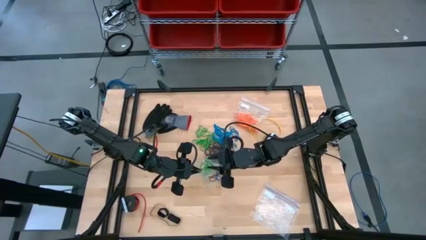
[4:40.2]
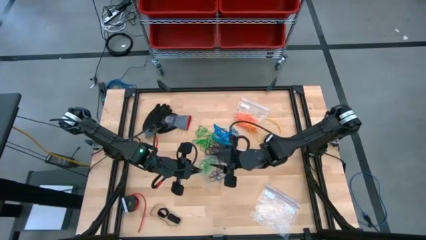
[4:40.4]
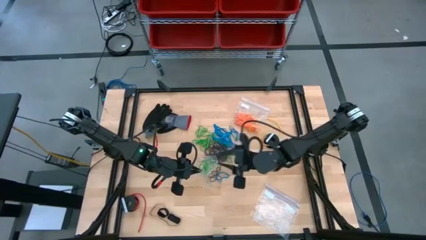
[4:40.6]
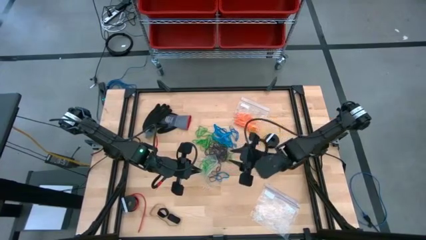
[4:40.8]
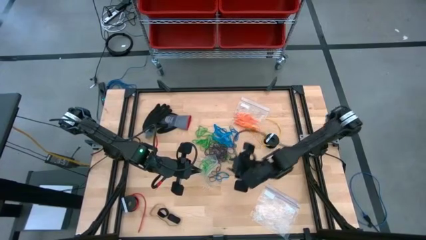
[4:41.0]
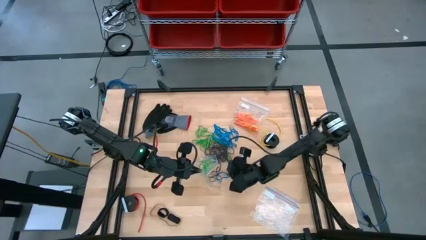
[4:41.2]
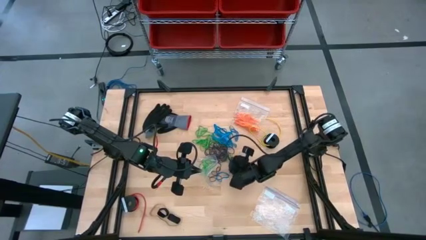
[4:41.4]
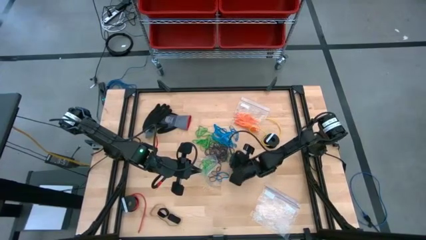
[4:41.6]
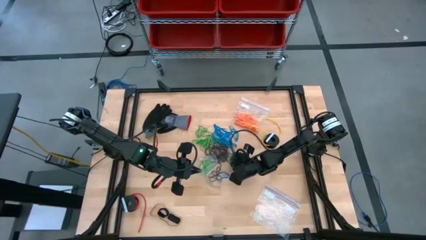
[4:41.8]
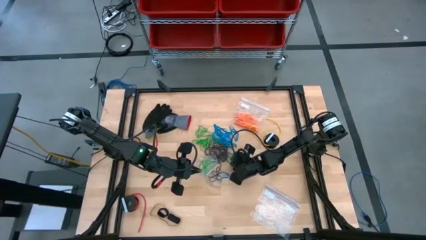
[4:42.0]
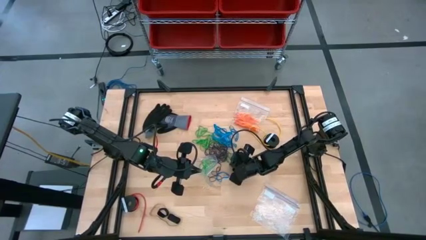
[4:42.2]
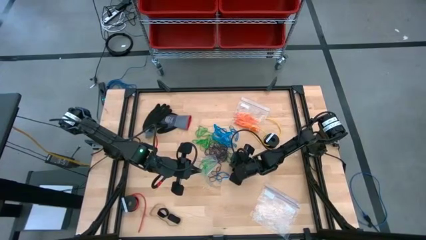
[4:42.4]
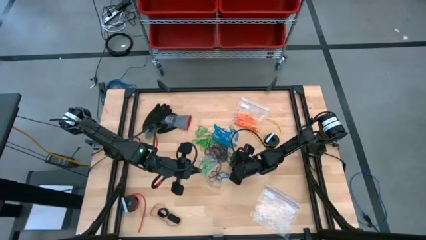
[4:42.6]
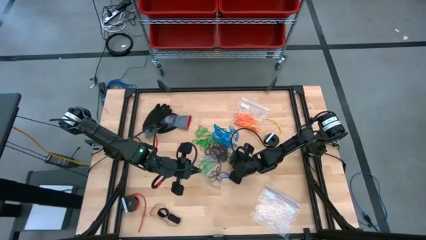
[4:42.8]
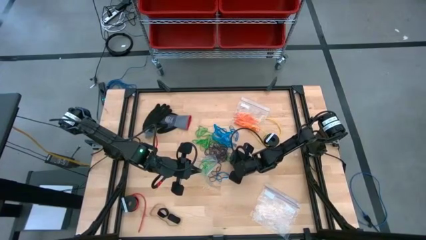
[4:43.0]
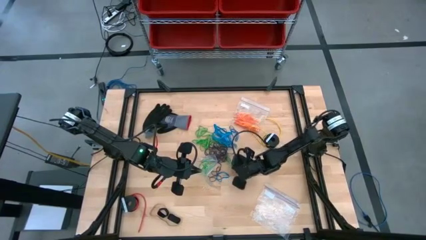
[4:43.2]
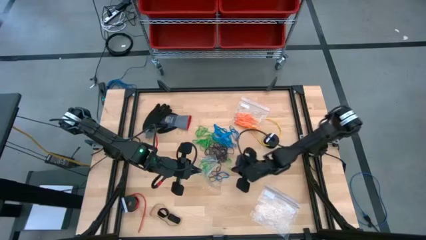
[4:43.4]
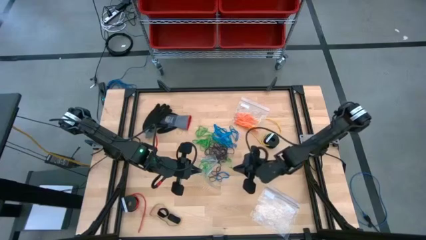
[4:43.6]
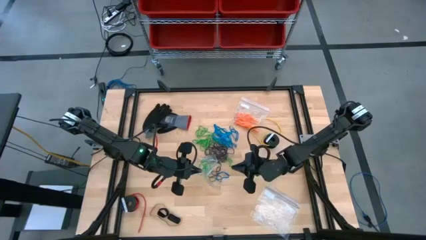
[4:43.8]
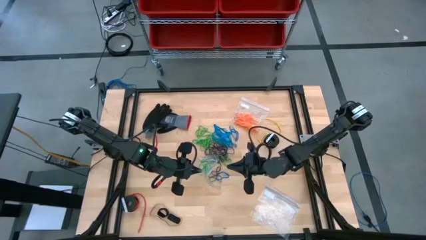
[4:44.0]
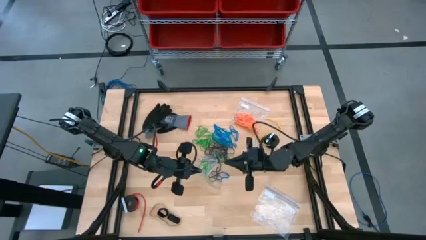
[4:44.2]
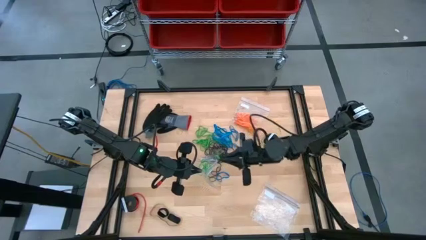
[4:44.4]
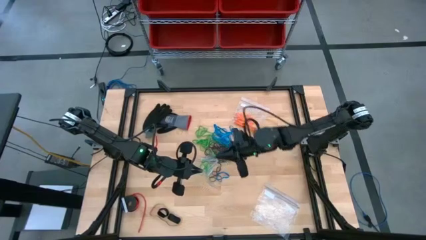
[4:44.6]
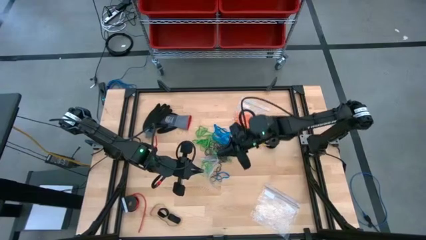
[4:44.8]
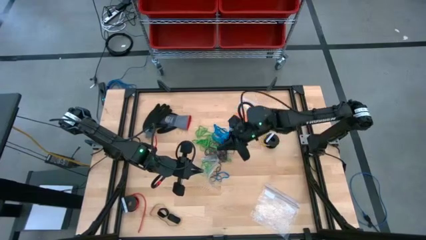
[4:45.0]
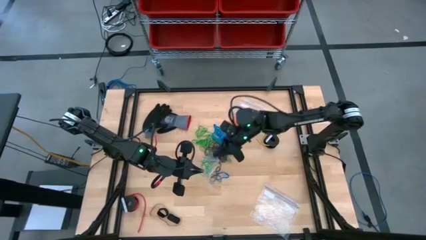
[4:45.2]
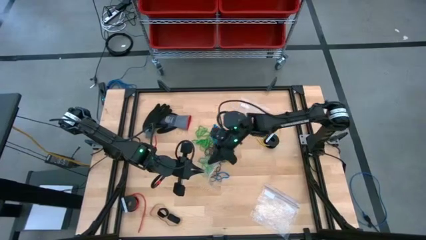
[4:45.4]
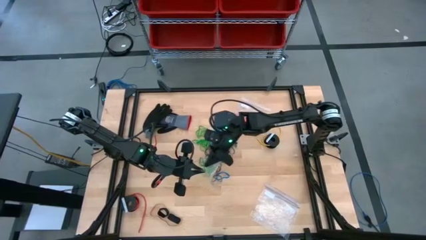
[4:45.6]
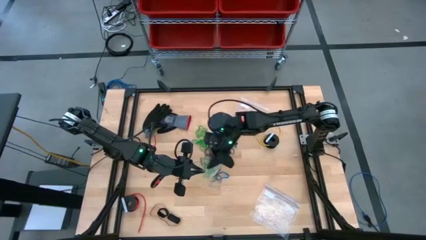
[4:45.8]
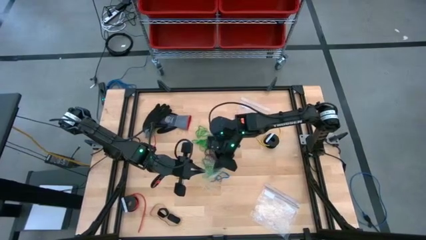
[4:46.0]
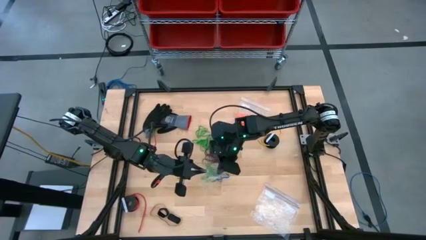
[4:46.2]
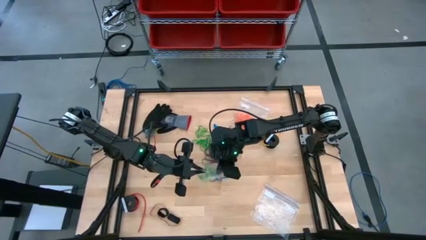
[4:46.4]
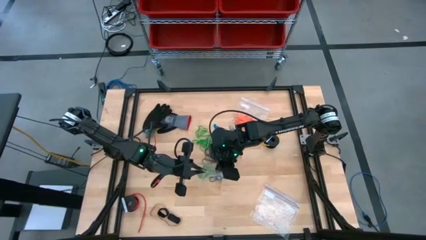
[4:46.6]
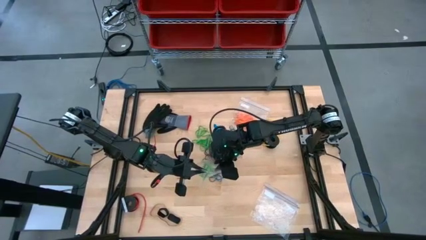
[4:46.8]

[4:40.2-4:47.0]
Task: Sort rubber bands
Put the green rubber band into the transparent zip bag

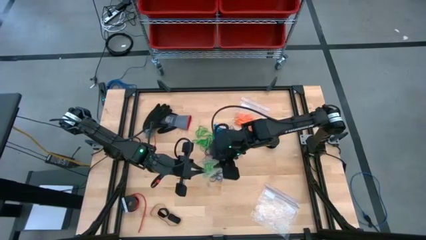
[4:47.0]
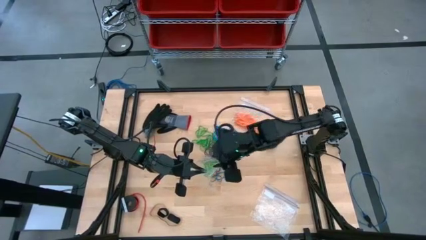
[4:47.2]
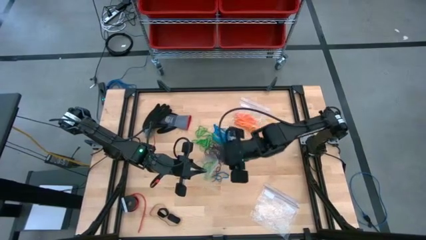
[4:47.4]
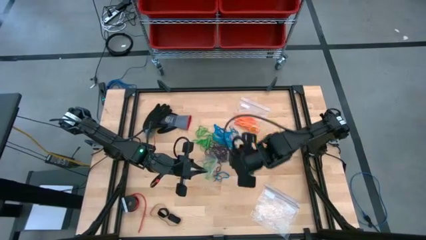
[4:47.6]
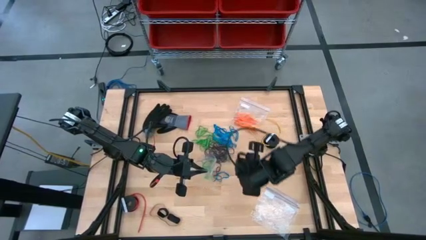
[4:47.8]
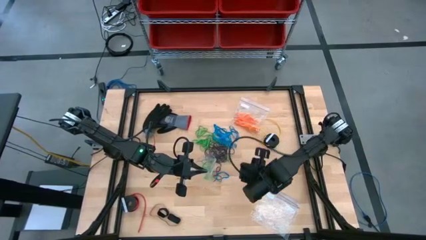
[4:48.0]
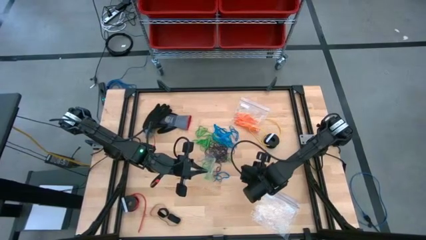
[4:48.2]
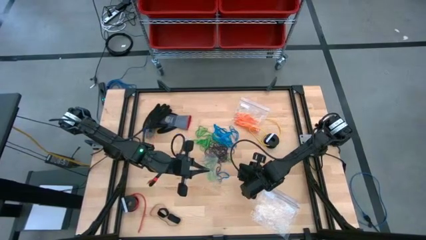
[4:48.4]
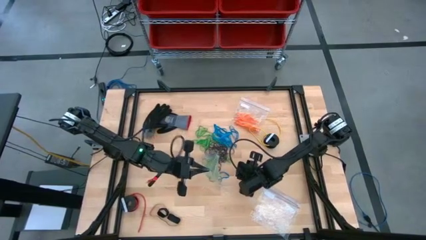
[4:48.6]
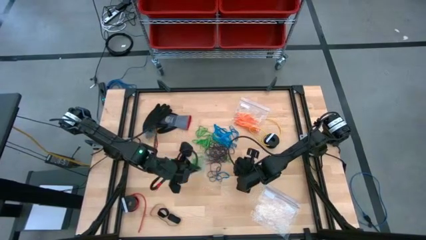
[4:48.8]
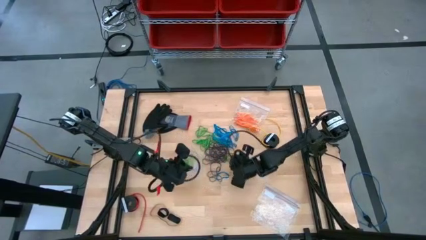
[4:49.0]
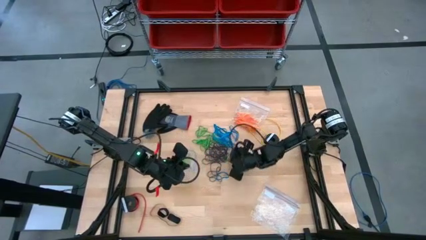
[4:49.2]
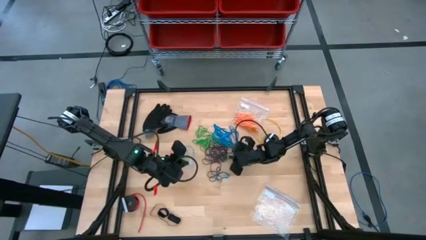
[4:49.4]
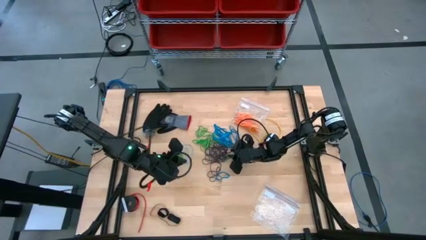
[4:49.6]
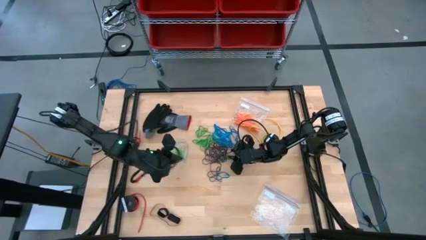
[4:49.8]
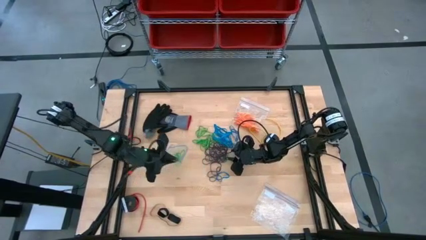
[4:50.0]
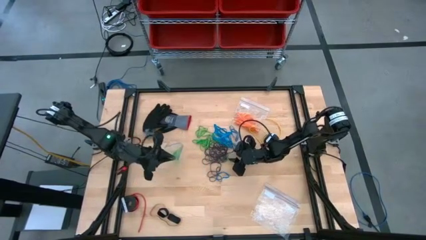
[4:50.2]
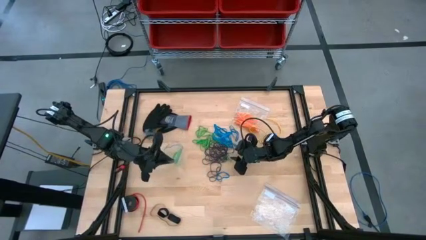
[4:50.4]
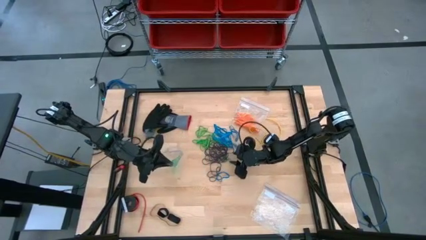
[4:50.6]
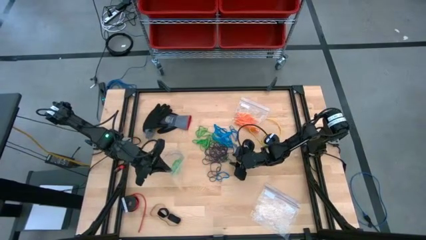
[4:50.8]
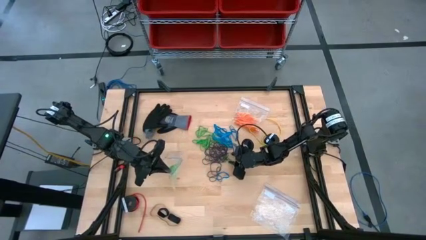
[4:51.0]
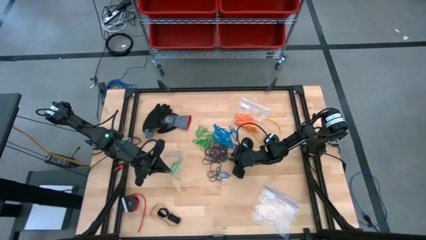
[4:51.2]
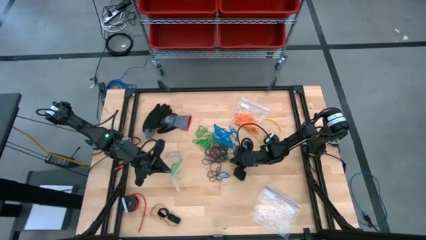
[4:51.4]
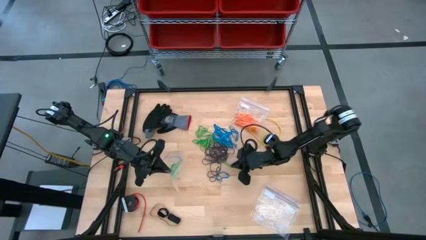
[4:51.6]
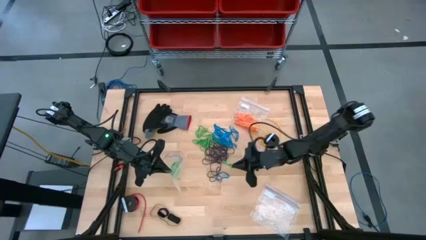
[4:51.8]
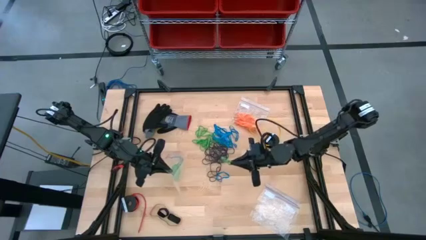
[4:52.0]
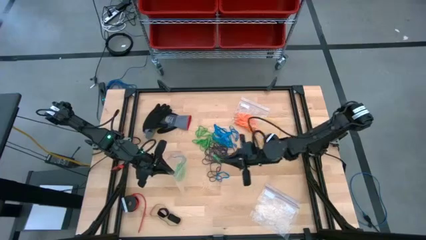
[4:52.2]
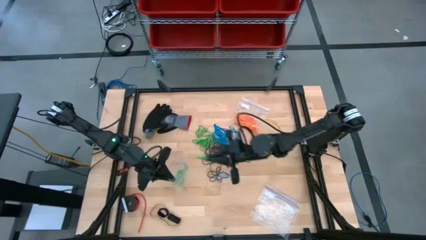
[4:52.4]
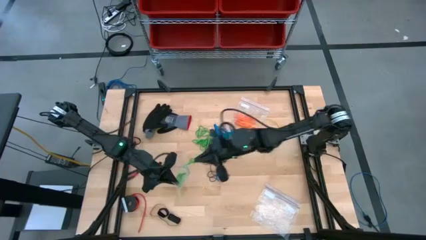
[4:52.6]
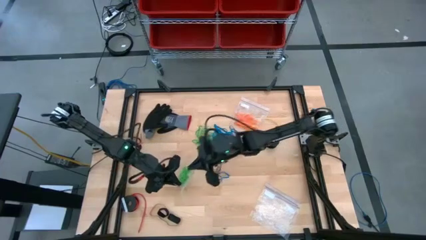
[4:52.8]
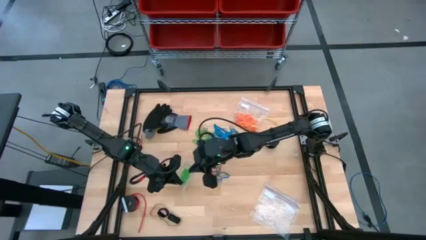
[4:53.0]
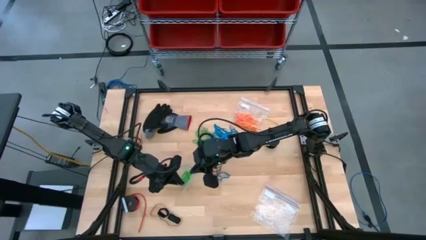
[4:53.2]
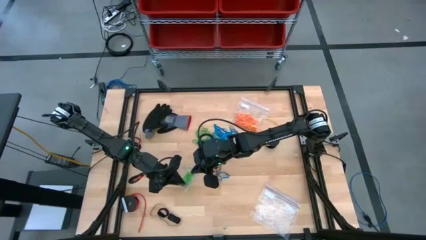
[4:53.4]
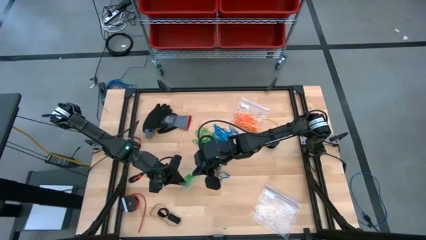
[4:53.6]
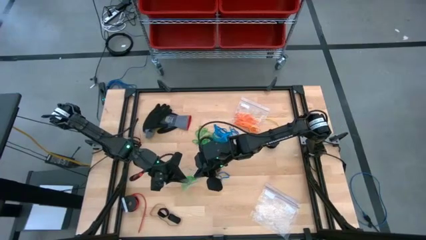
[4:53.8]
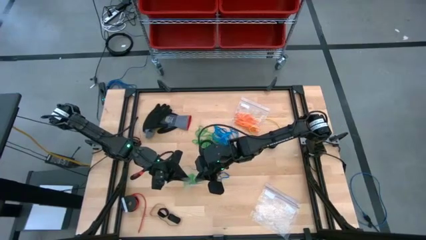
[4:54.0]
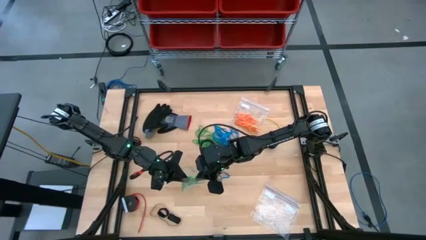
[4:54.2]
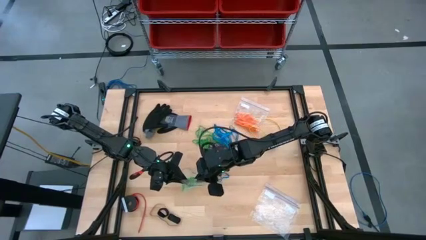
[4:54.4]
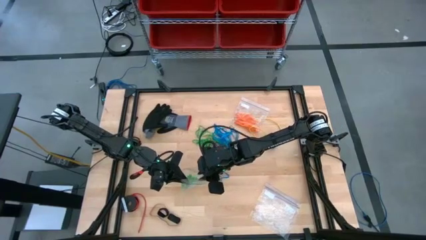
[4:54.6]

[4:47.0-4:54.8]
Put the green rubber band into the transparent zip bag
